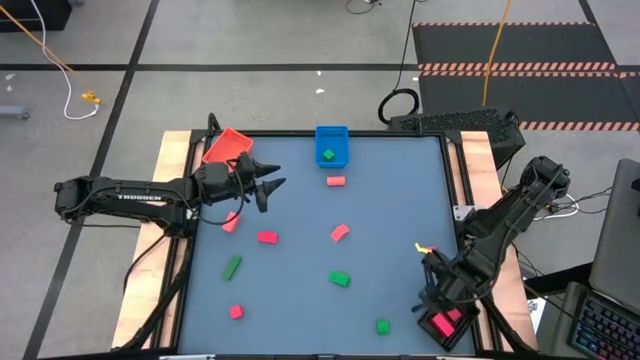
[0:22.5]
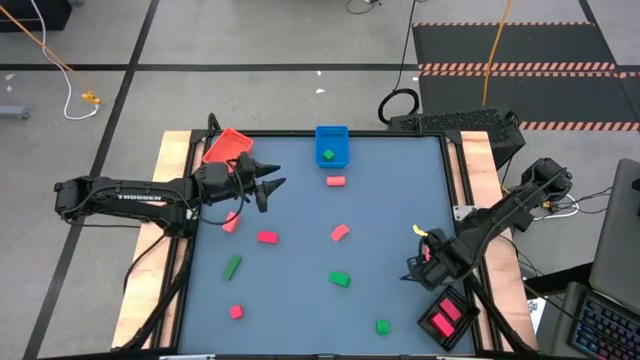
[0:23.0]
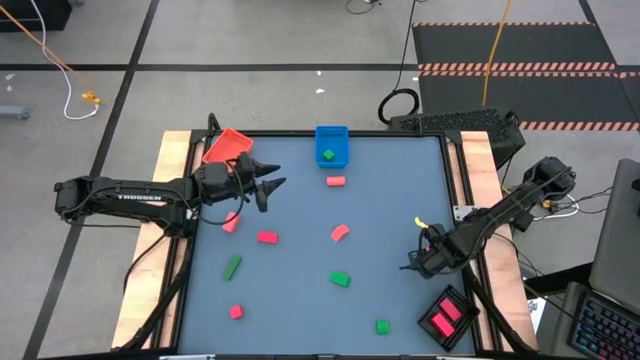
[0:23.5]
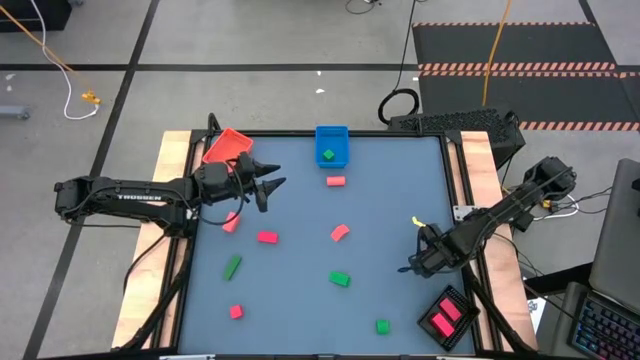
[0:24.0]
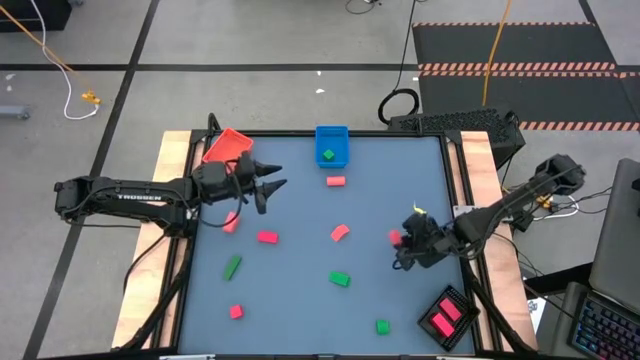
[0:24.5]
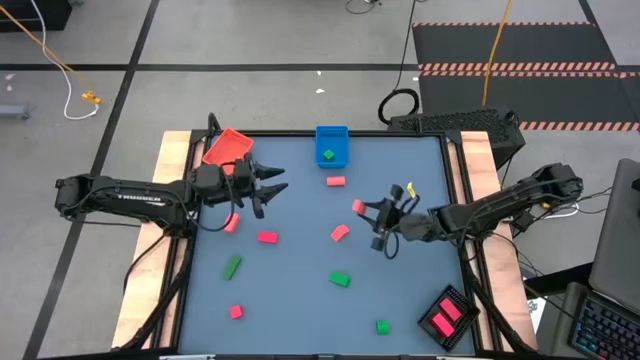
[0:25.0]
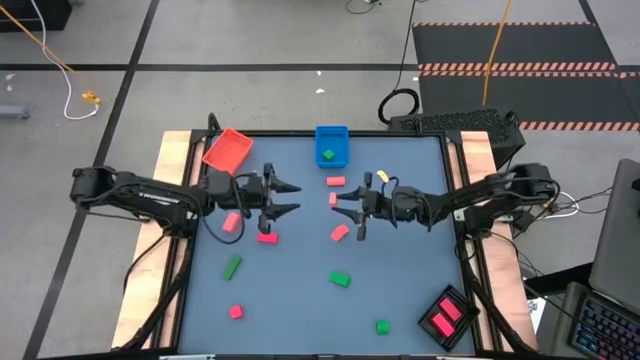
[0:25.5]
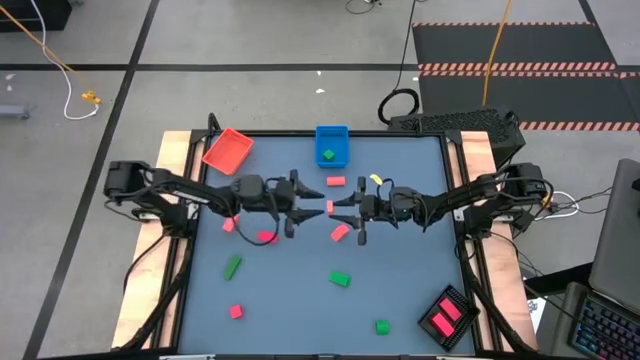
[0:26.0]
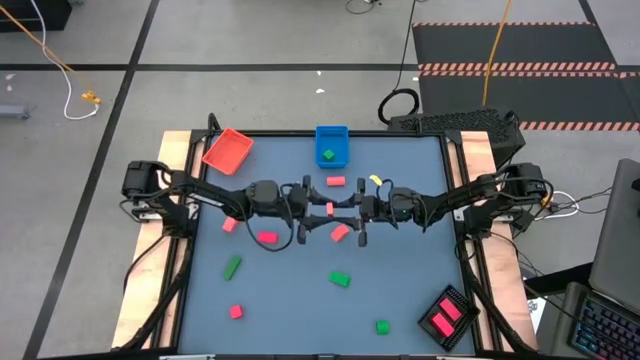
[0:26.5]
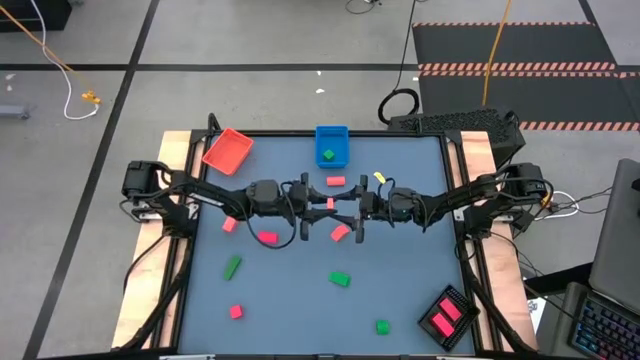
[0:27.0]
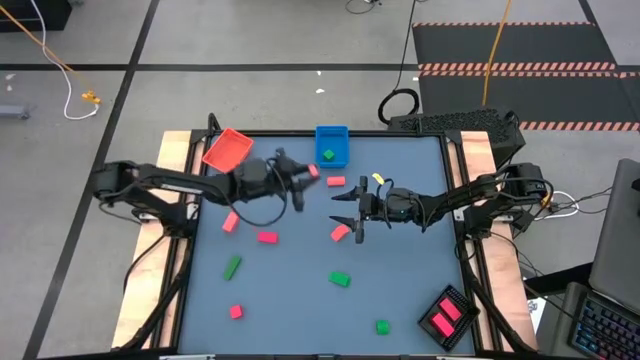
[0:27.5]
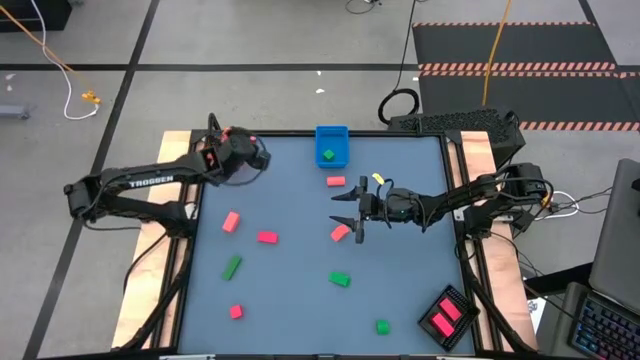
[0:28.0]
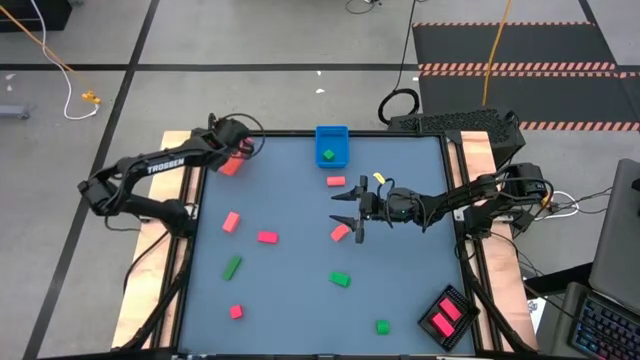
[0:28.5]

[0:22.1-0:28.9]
Task: Sort & place blocks by color
Put the orange block into the orange bin

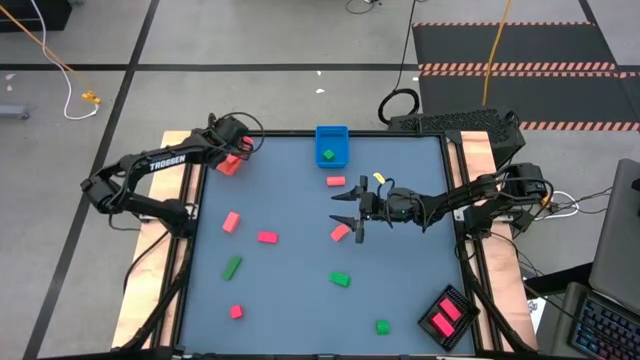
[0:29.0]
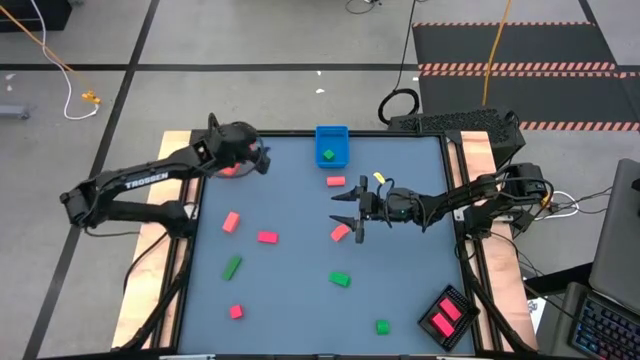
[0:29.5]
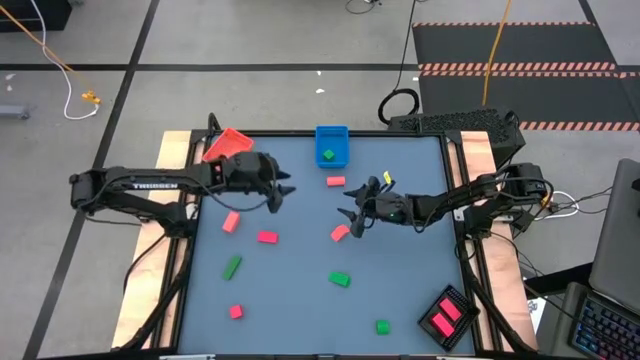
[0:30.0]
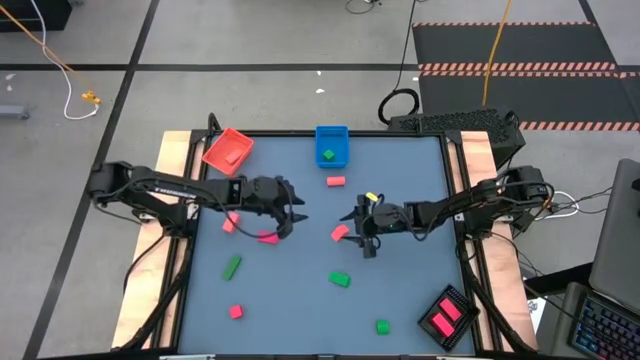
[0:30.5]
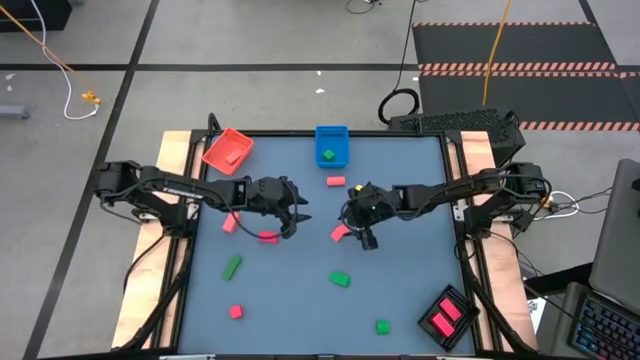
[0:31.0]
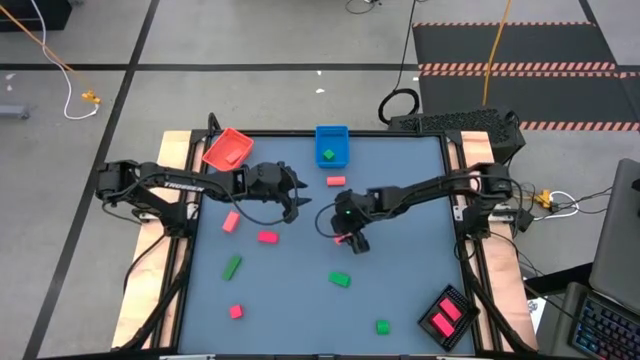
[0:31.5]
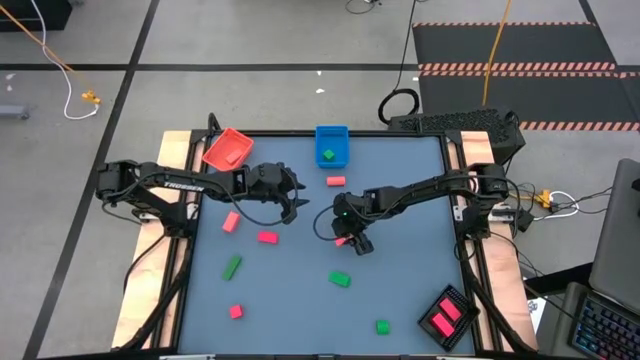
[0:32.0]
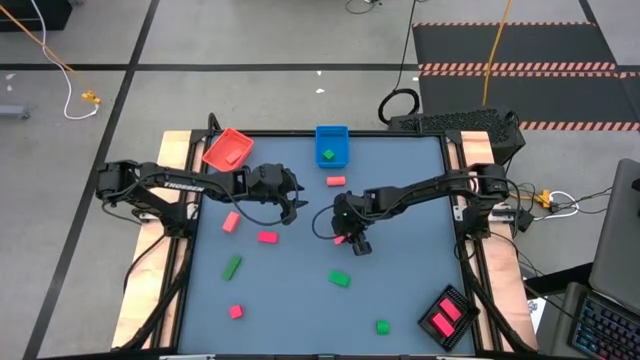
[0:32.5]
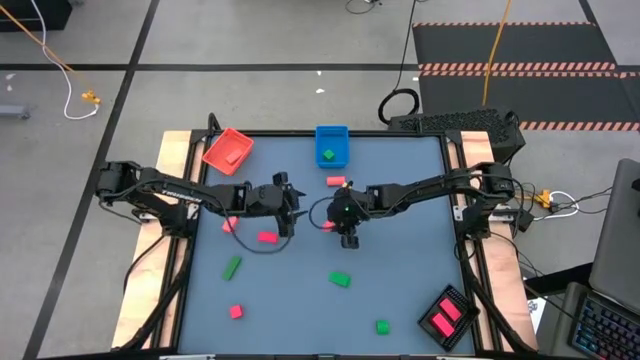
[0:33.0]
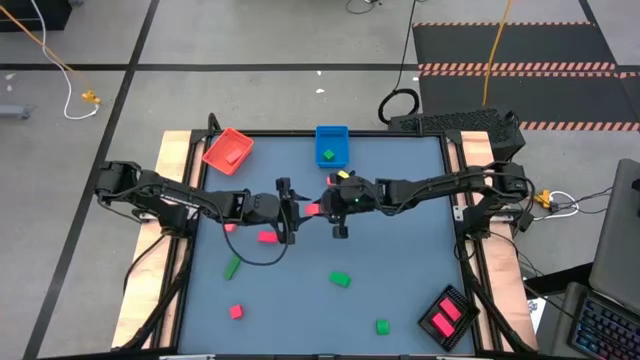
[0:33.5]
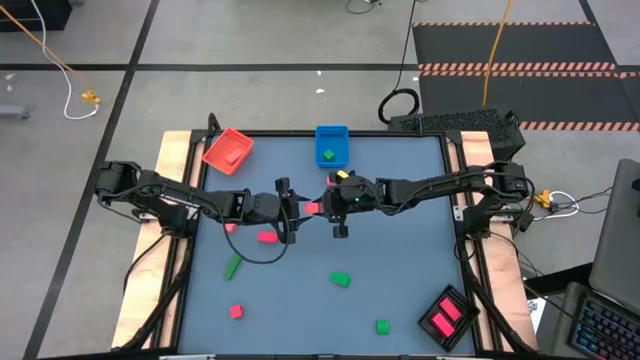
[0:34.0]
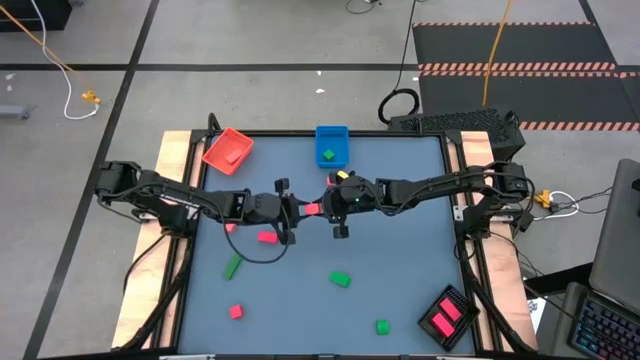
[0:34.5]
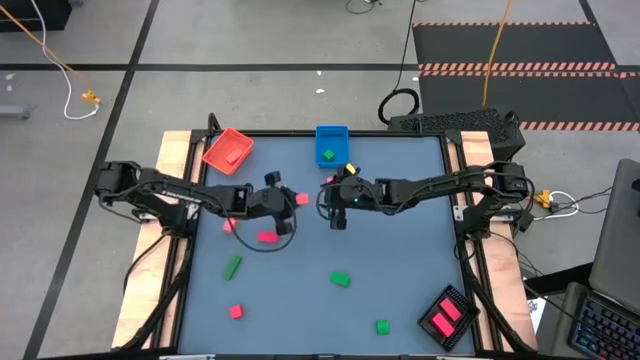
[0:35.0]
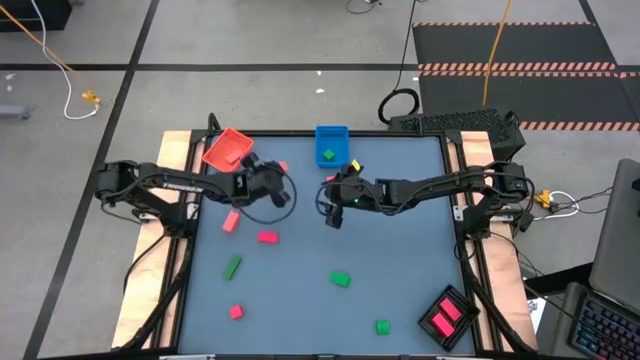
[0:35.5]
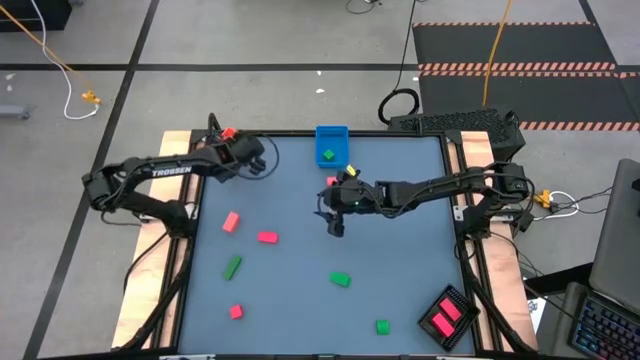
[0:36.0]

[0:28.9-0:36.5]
Put the orange block into the orange bin

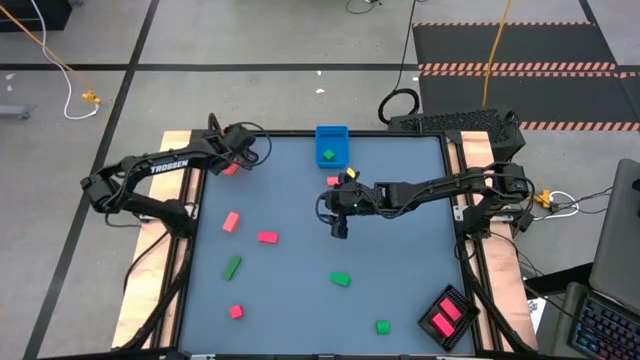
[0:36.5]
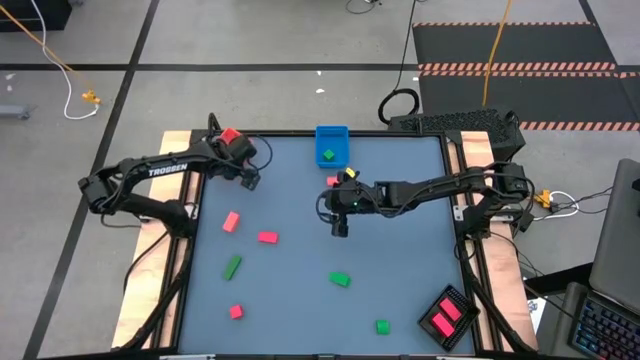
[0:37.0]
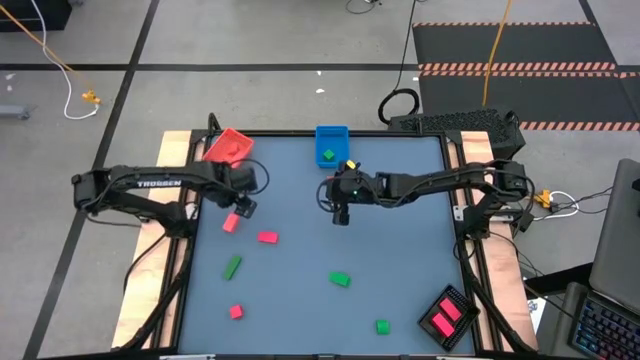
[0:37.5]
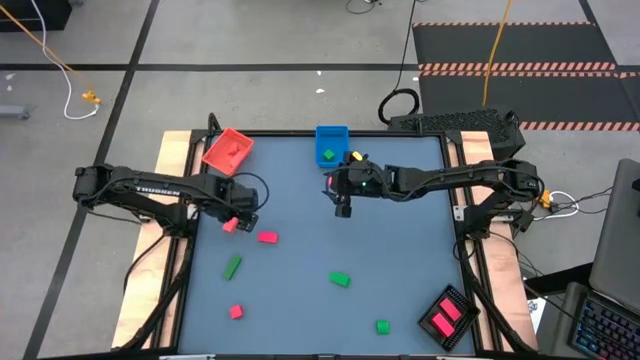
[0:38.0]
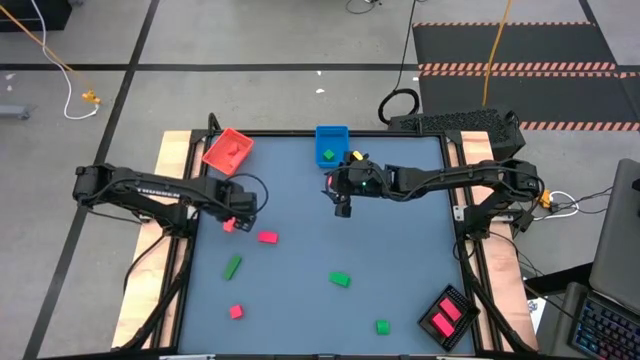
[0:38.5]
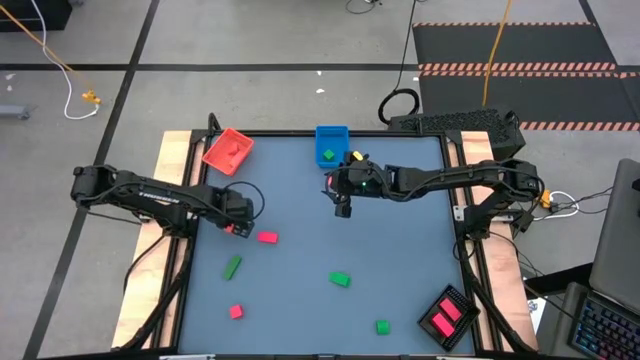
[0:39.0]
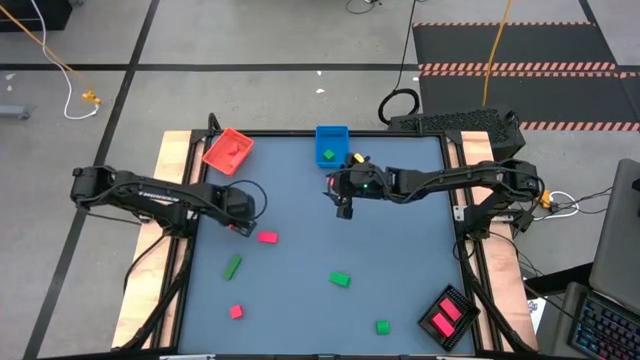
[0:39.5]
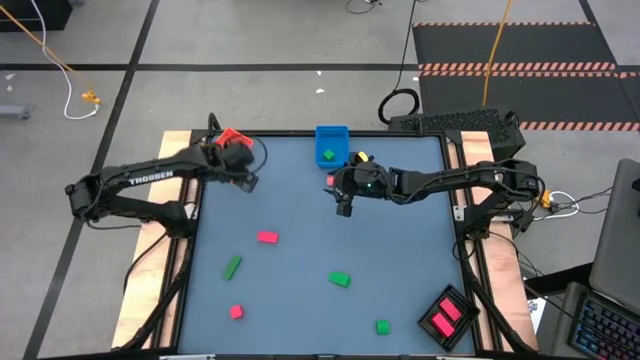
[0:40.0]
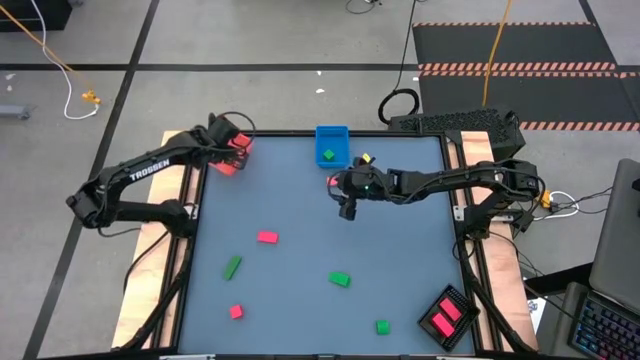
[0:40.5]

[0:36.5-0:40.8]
Put the orange block into the orange bin

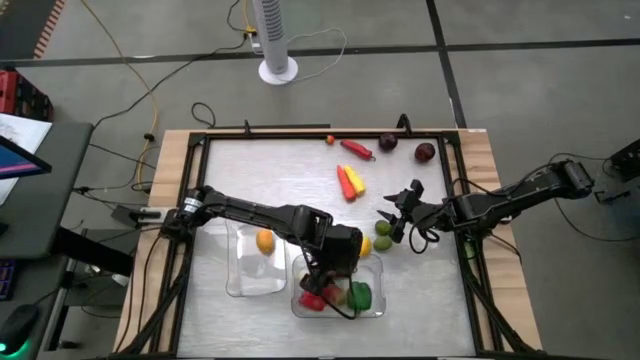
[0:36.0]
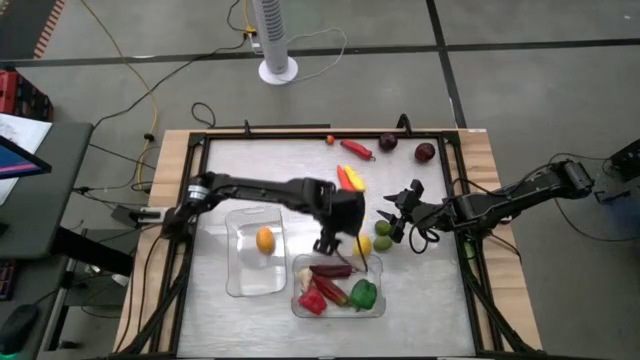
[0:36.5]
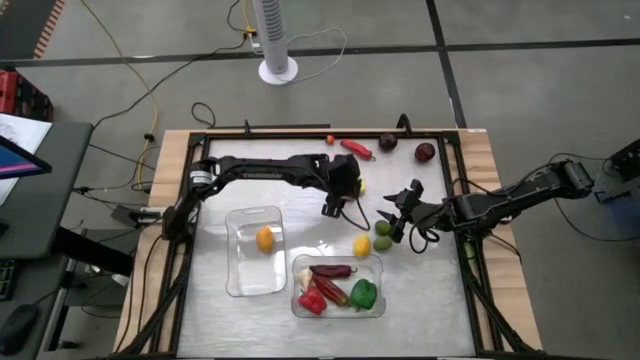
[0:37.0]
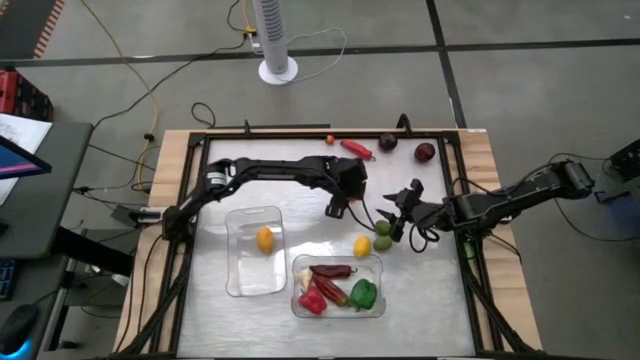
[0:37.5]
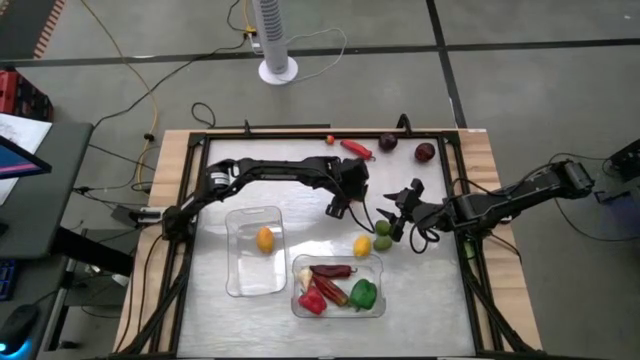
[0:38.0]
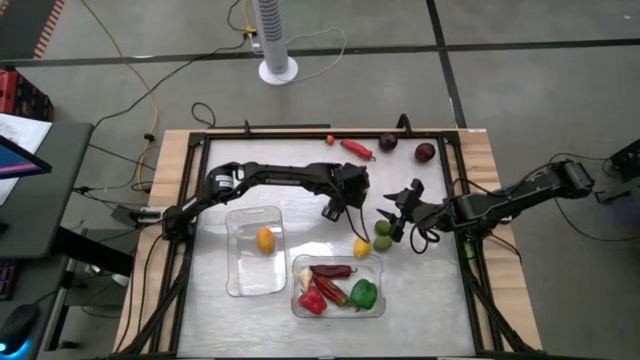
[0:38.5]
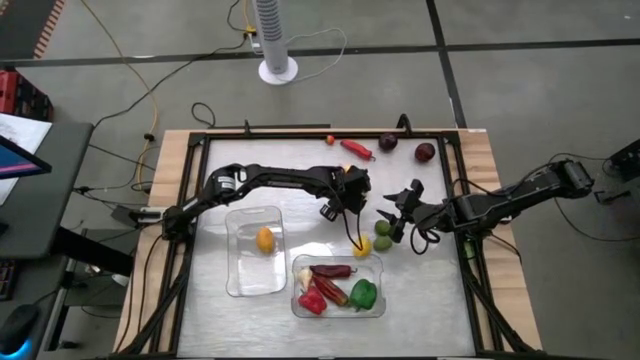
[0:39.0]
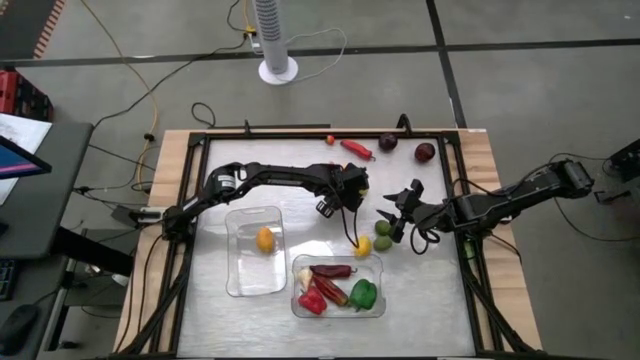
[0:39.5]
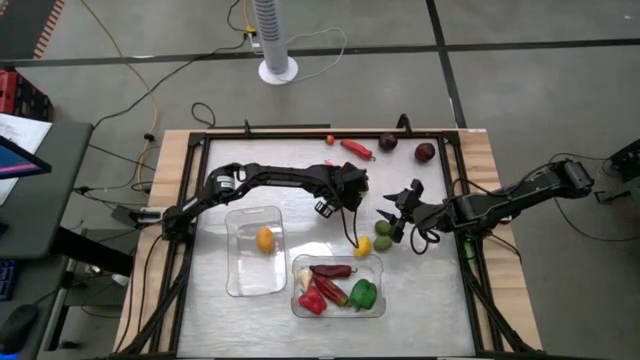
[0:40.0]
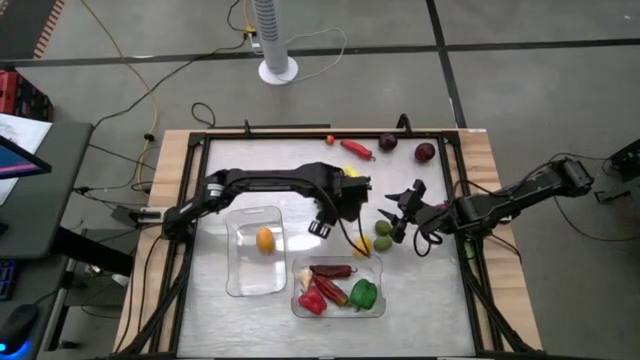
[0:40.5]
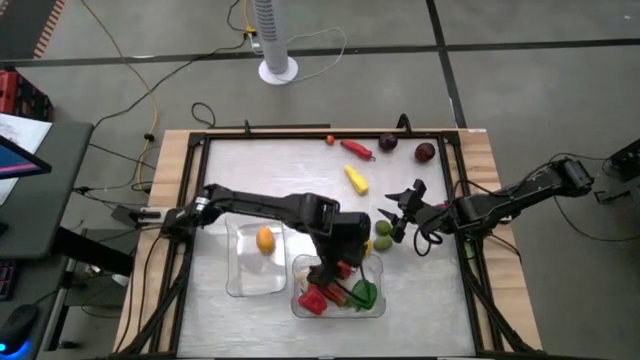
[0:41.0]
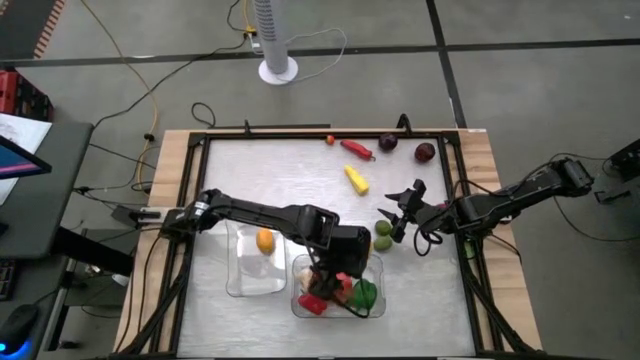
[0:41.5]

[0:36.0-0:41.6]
Task: Sort produce into baskets
Put the orange carrot into the right transparent bin
